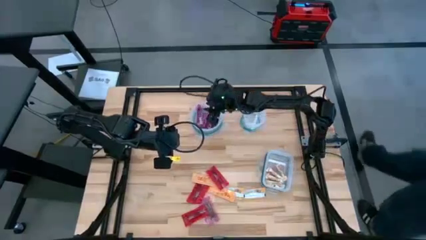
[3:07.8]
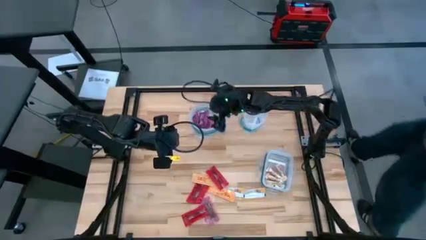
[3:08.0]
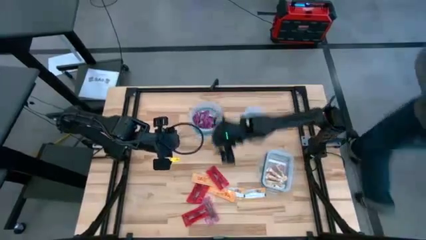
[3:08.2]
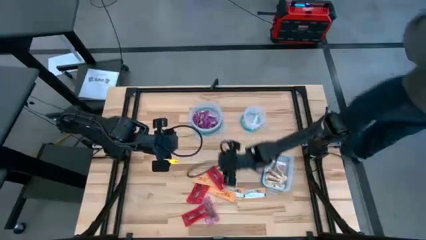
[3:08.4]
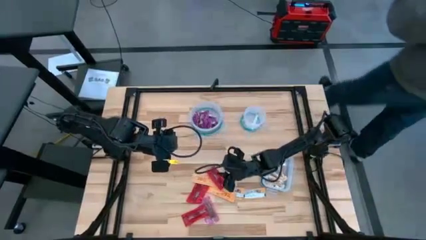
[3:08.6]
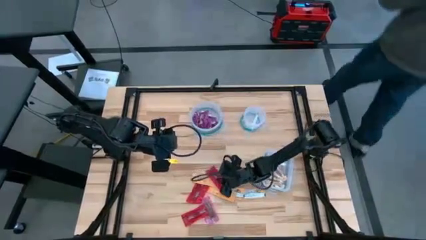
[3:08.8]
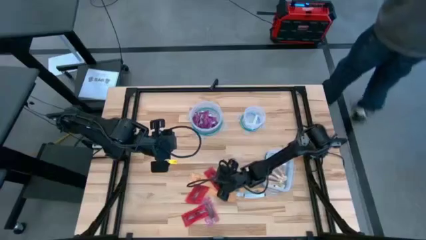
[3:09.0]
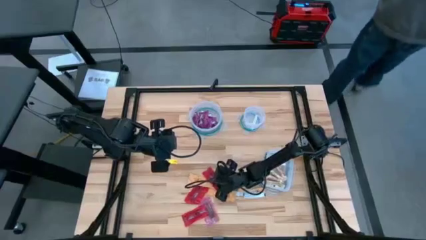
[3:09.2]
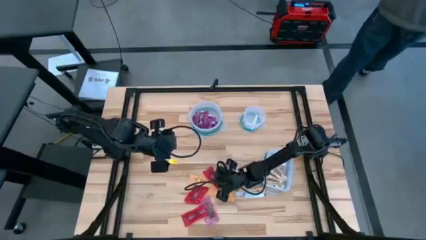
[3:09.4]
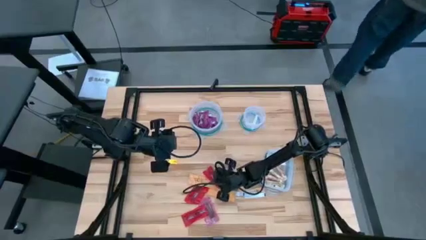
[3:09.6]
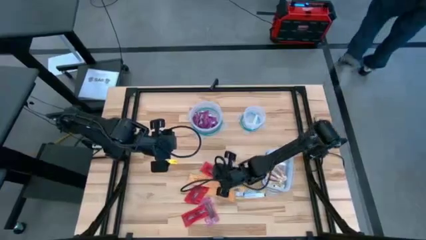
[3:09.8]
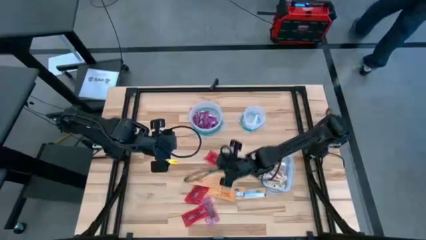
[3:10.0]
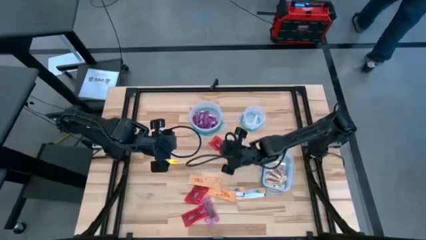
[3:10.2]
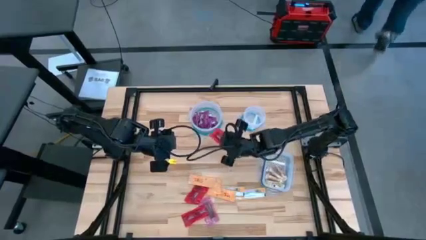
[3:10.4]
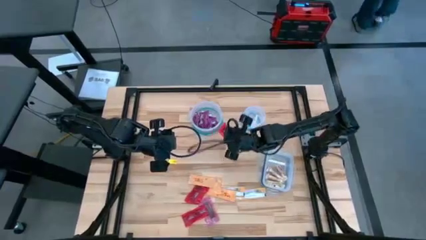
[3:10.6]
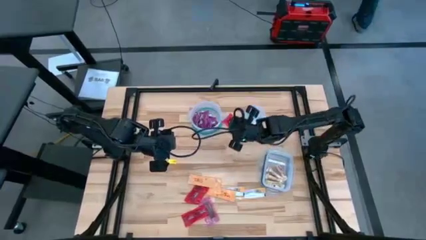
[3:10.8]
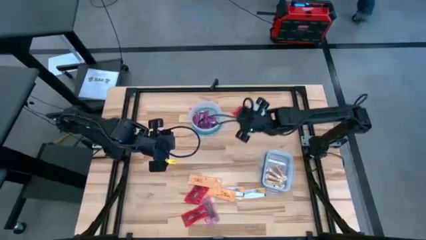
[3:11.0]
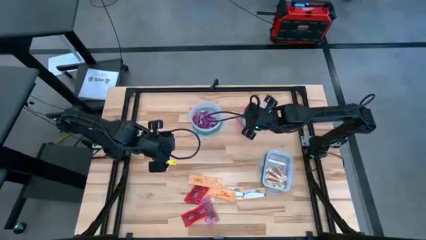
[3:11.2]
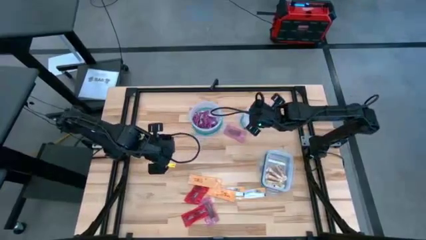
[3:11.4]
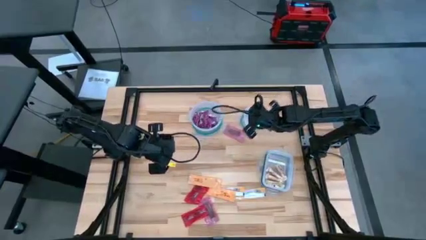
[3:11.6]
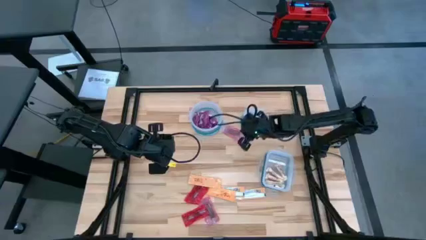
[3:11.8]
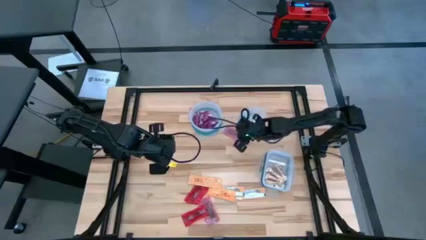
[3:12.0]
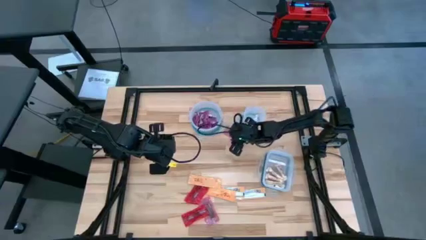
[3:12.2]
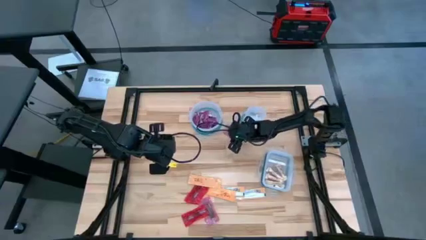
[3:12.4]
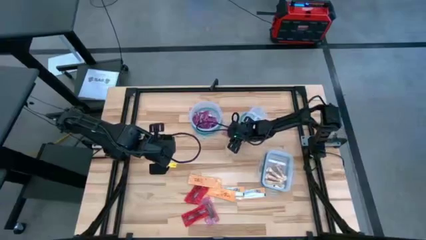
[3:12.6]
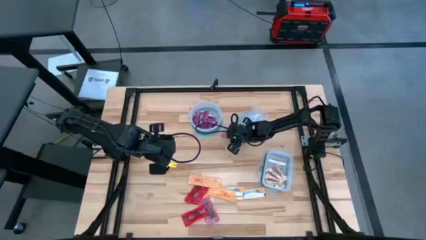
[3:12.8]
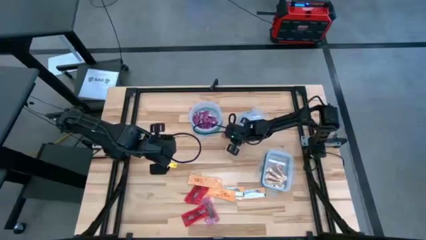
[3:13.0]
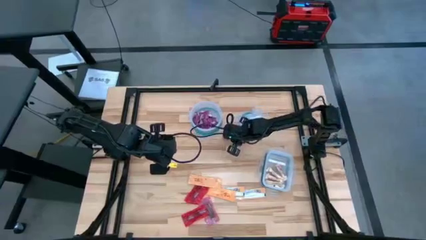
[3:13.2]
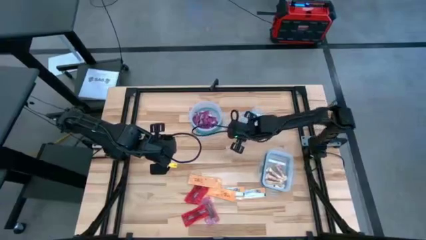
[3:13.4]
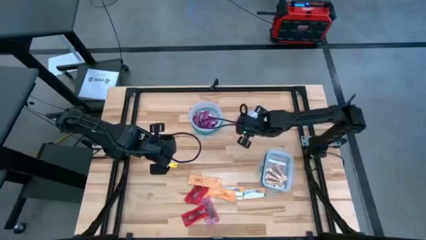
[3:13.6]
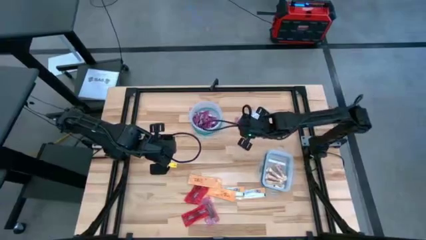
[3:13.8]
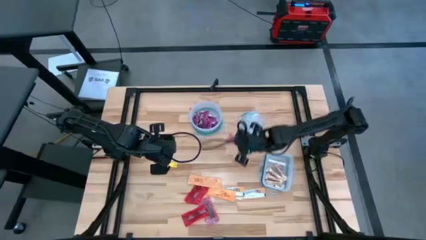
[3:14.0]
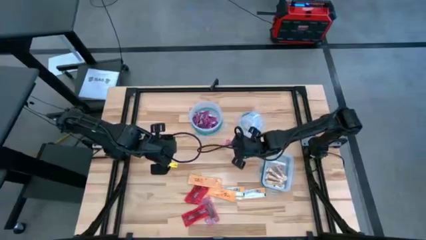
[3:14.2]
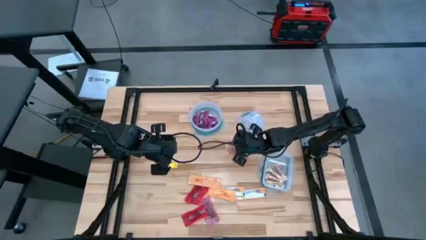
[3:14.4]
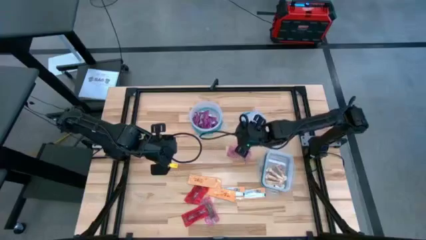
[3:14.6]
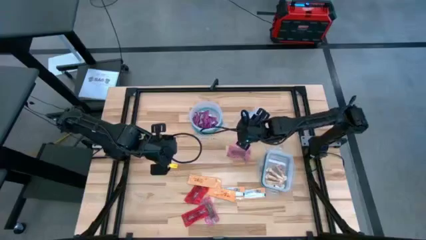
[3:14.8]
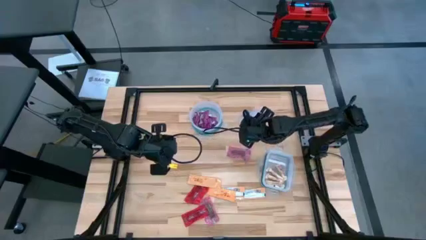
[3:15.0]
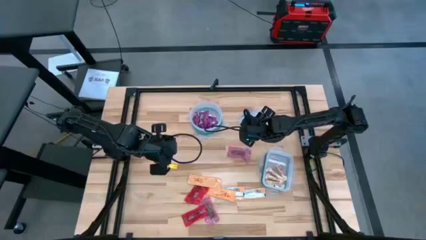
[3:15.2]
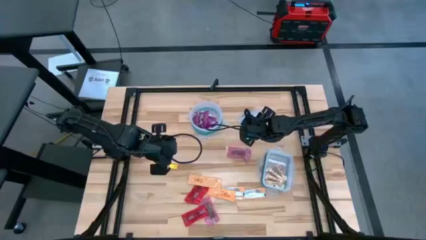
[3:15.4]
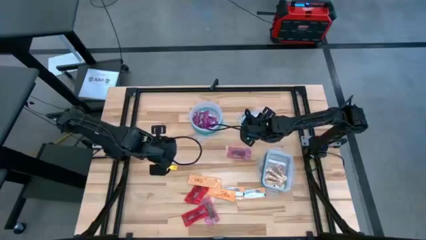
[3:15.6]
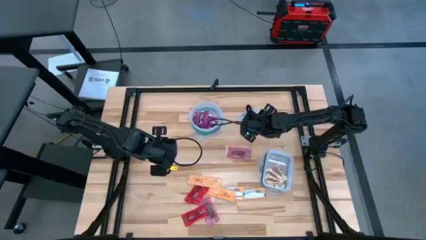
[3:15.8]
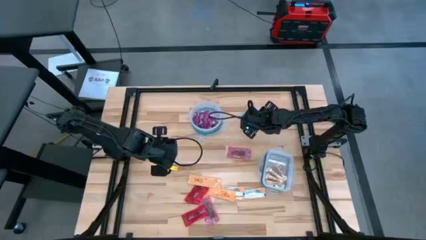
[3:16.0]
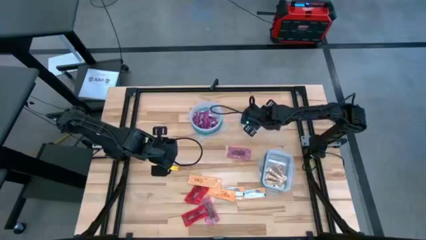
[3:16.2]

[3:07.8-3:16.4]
Task: Sort candy
Put the red candy into the big circular transparent bin

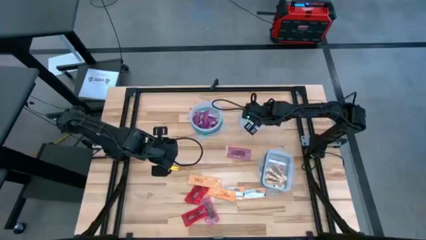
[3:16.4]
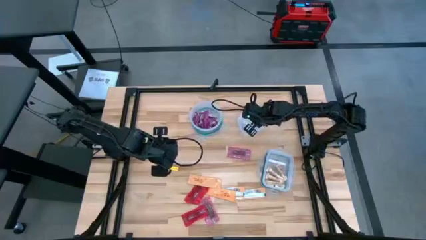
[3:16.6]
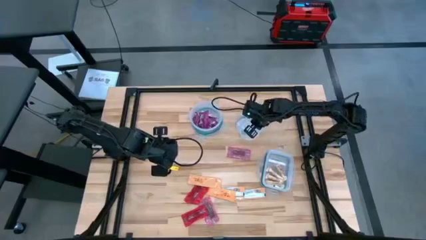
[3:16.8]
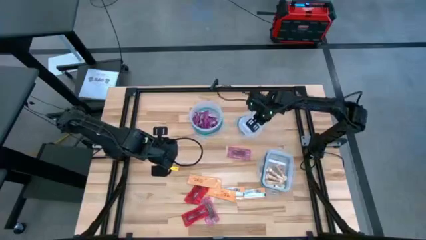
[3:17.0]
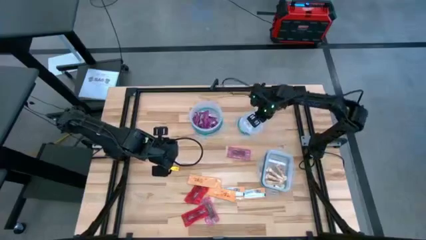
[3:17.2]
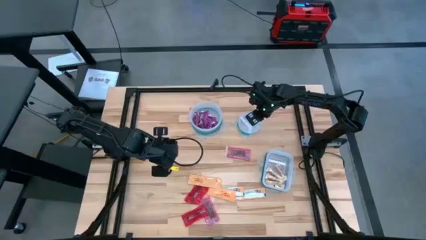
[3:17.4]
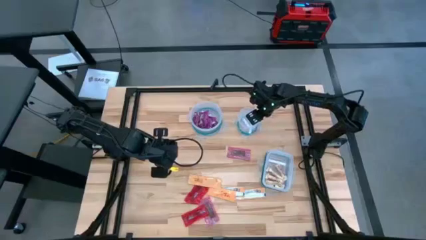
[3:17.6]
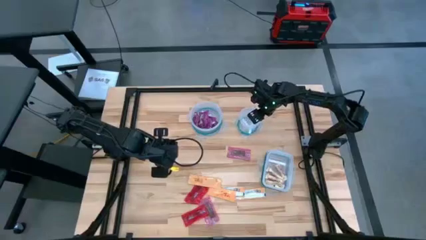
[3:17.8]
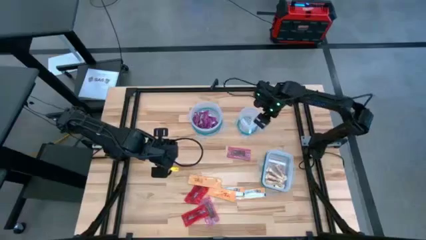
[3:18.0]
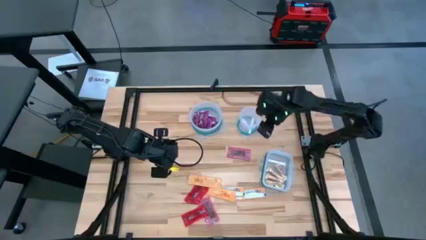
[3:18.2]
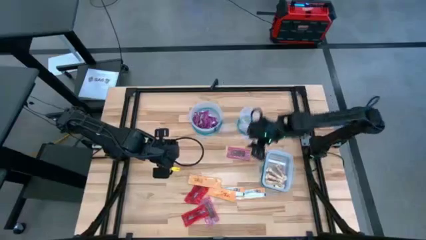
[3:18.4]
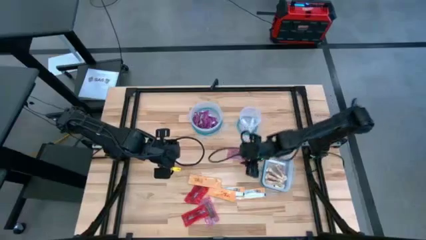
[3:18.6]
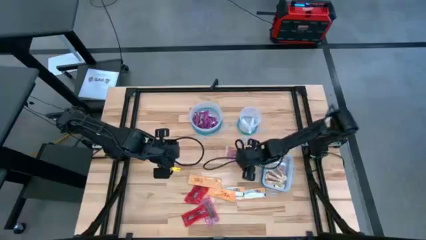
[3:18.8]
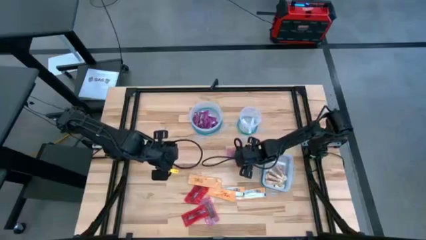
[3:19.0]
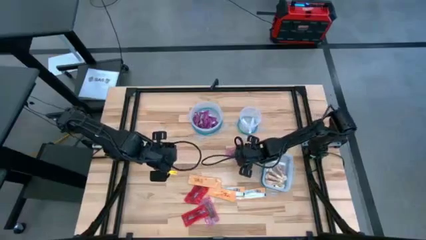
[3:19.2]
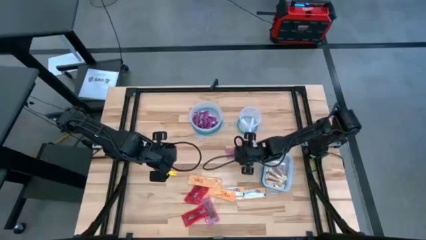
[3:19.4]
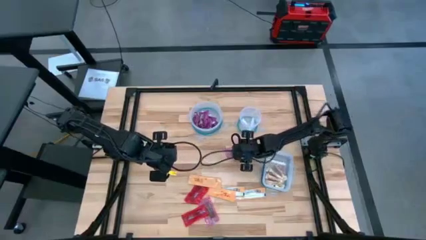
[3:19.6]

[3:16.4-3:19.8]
Adjust the small circular transparent bin

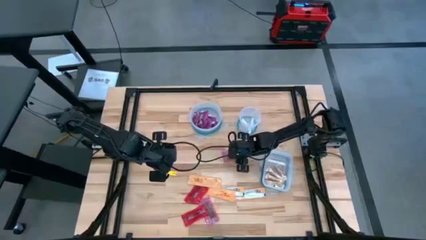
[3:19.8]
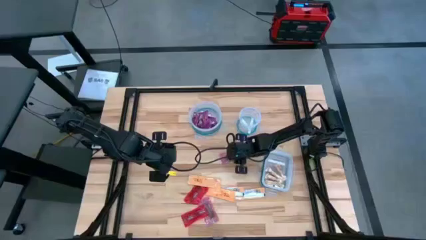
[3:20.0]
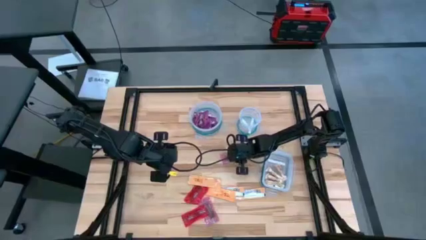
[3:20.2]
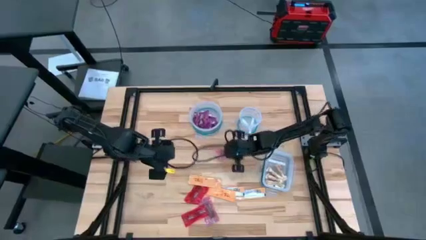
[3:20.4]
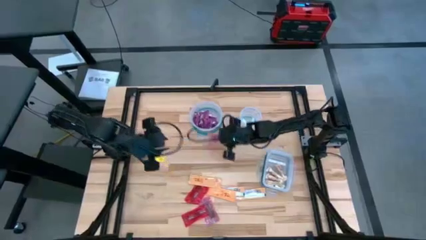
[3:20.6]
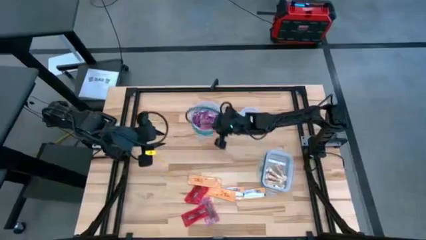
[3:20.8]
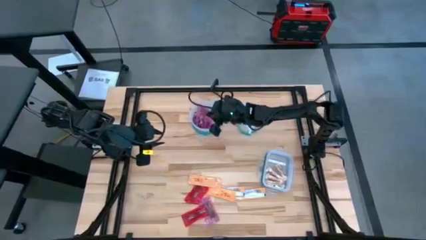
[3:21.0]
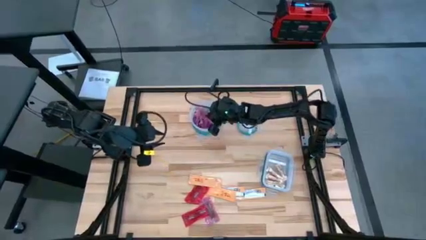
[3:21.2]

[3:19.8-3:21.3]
Put the red candy into the big circular transparent bin

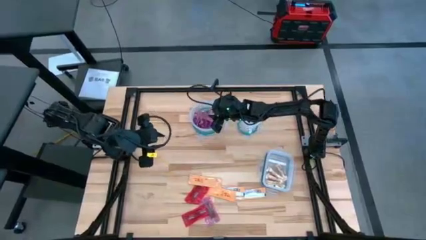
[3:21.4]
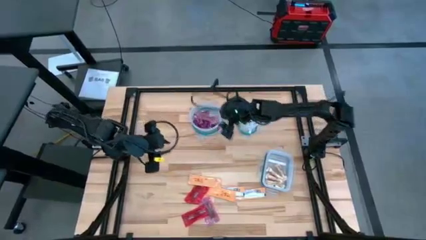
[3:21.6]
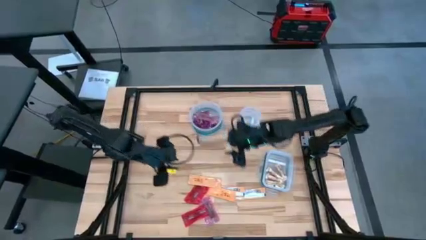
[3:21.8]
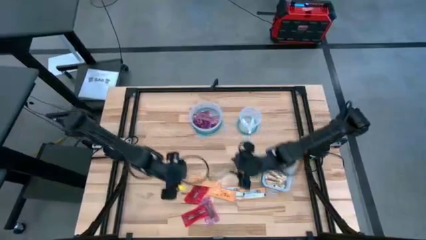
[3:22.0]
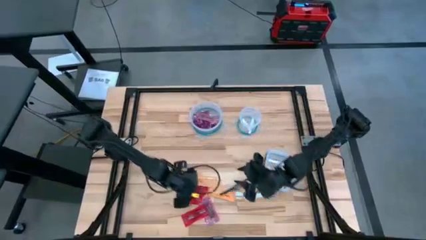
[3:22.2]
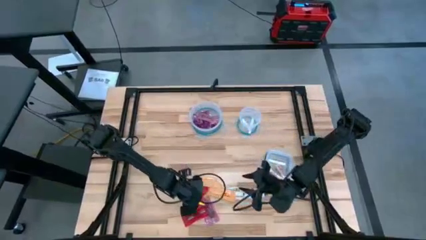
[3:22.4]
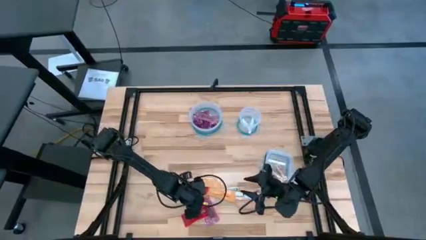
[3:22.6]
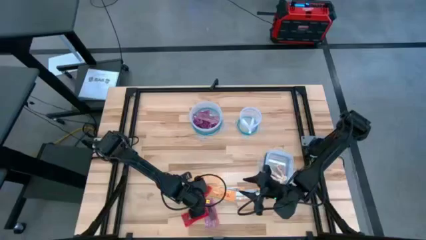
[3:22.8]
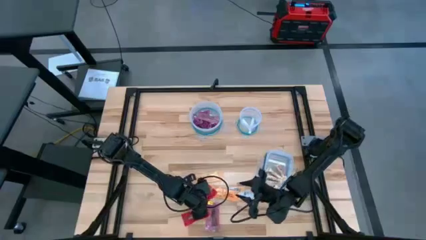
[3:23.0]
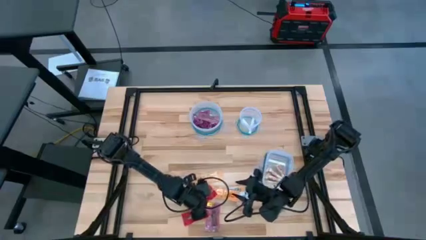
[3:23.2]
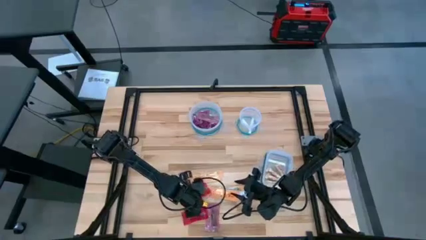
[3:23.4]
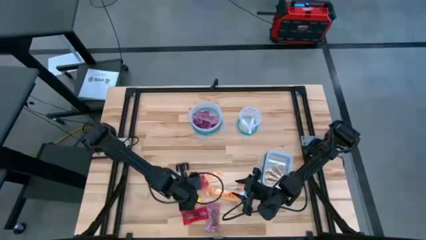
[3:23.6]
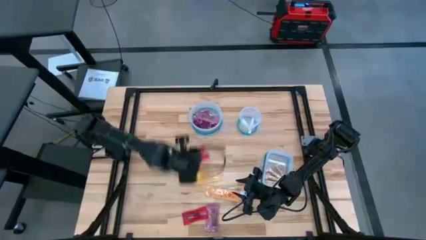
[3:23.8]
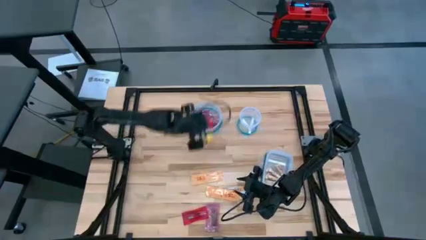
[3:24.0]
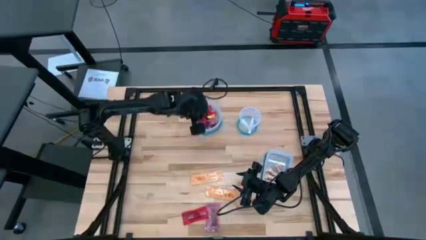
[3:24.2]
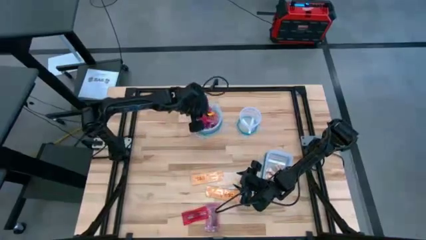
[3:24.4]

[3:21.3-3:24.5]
Put the red candy into the big circular transparent bin
